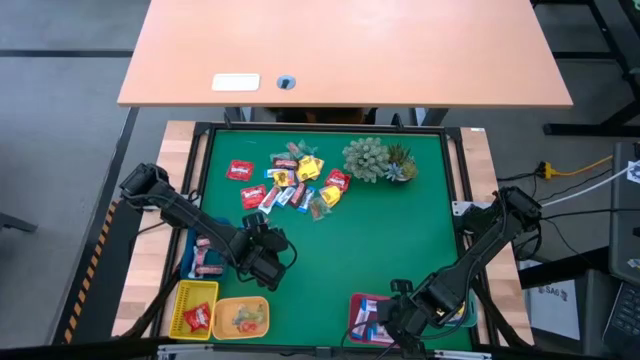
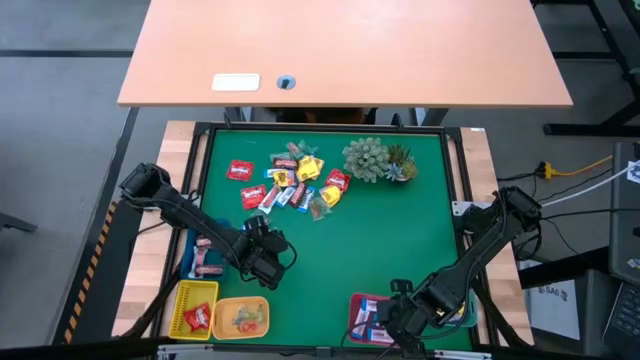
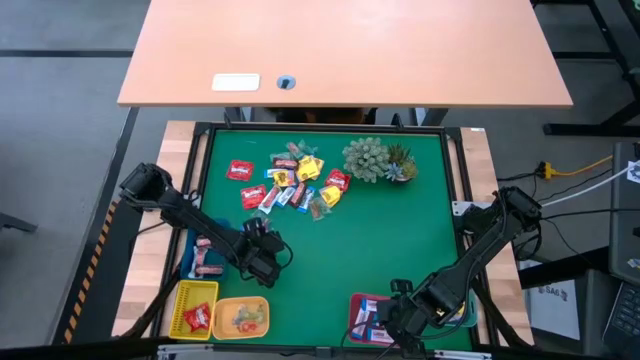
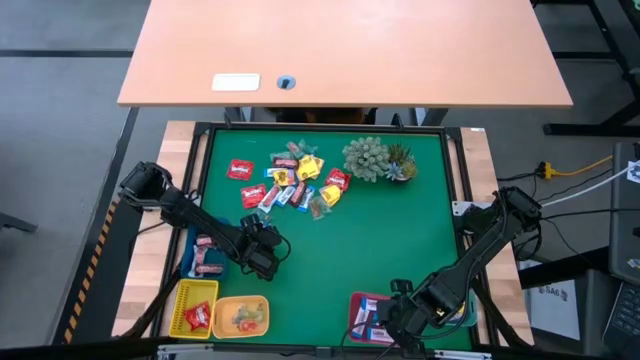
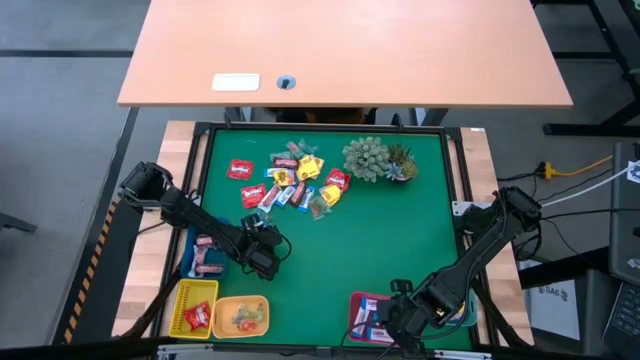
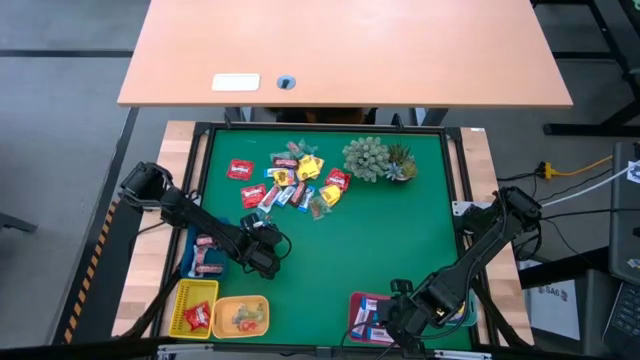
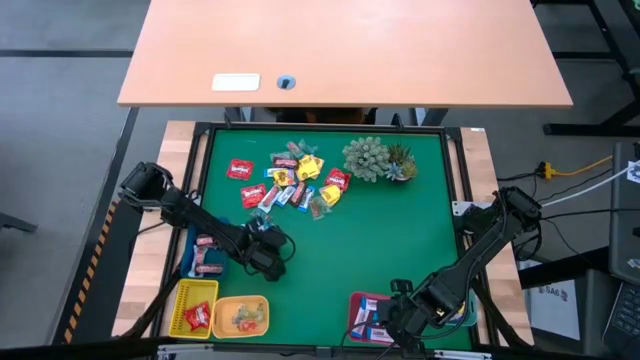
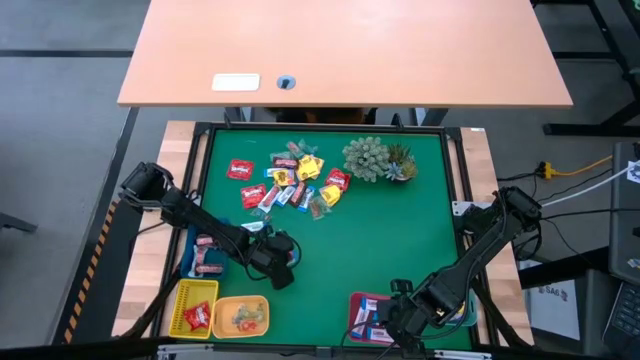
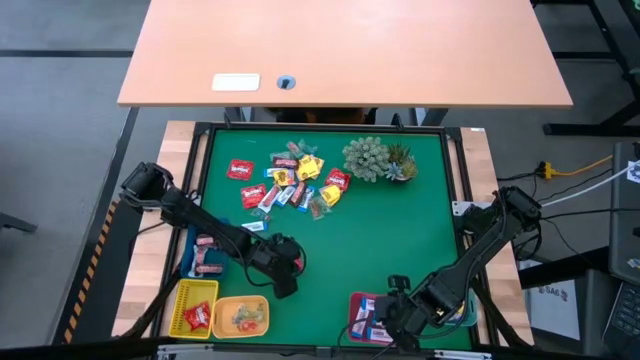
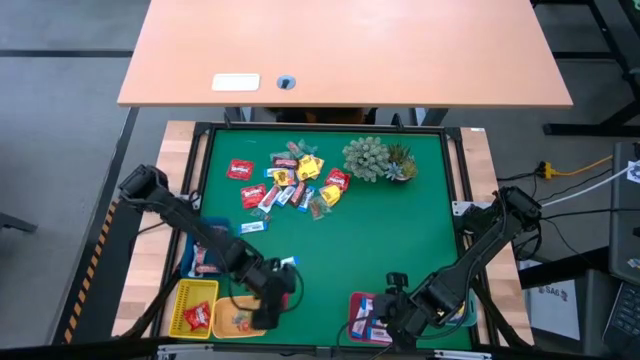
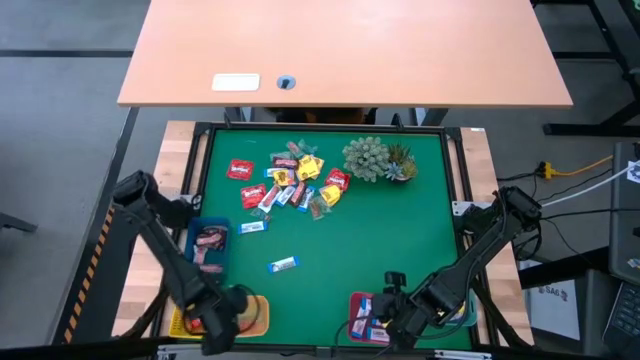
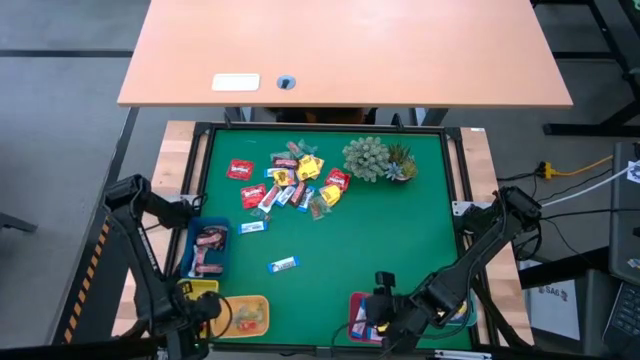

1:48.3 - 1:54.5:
Task: Sort candy
Put the red candy into the yellow bin

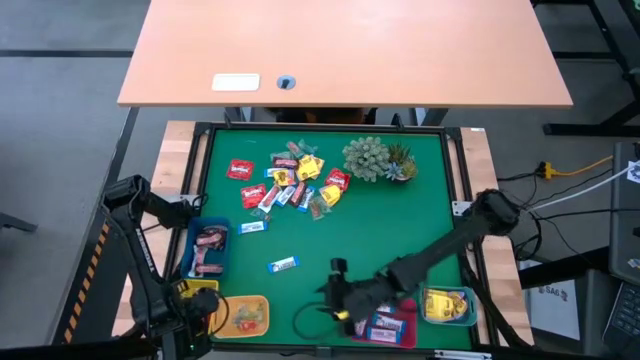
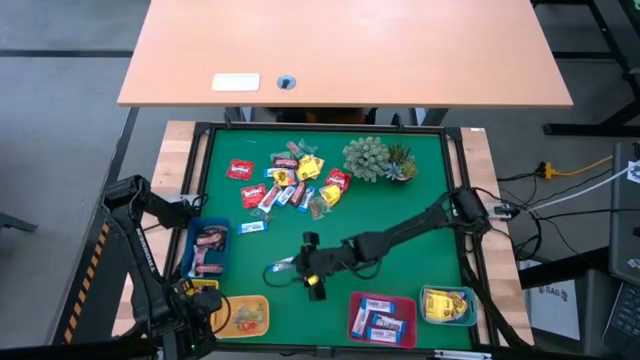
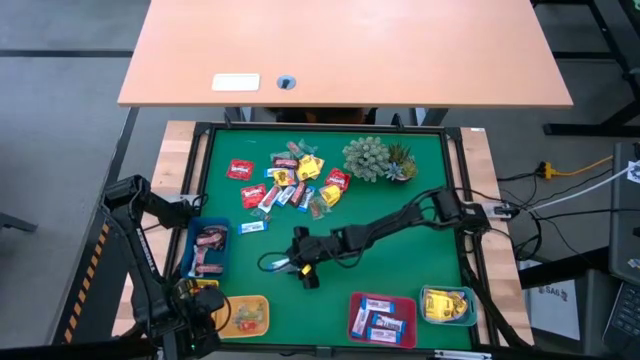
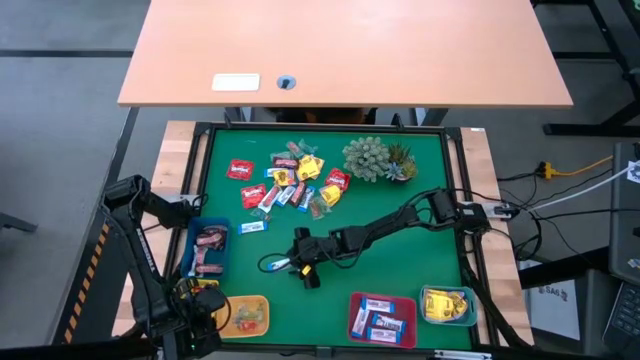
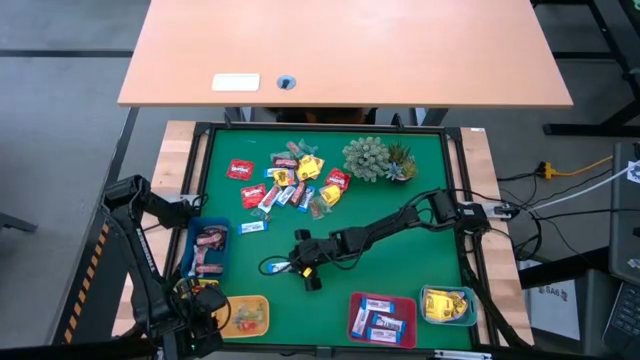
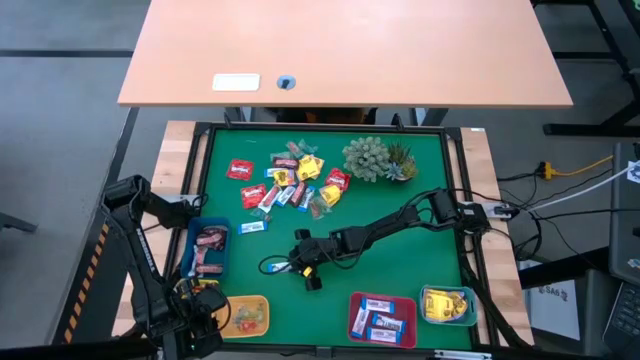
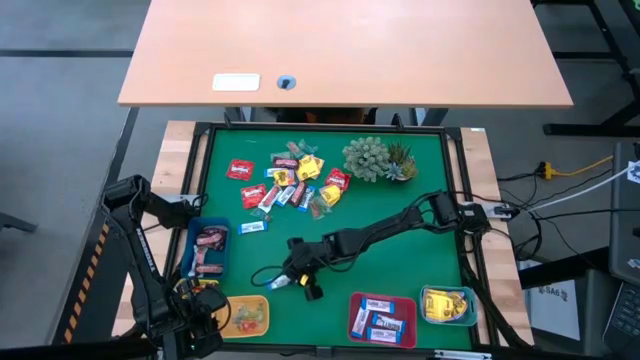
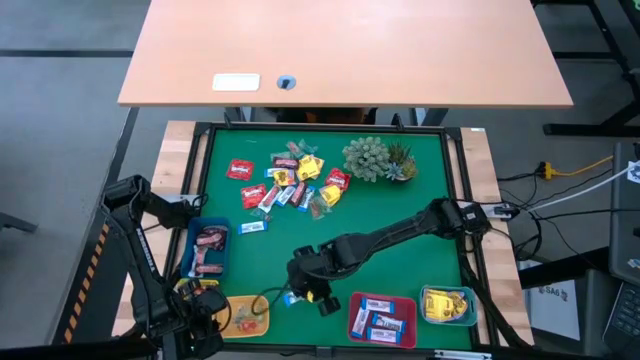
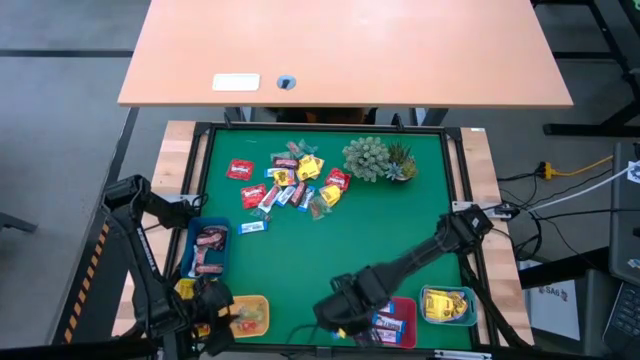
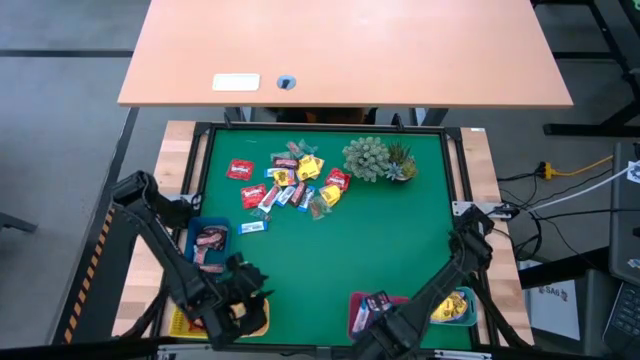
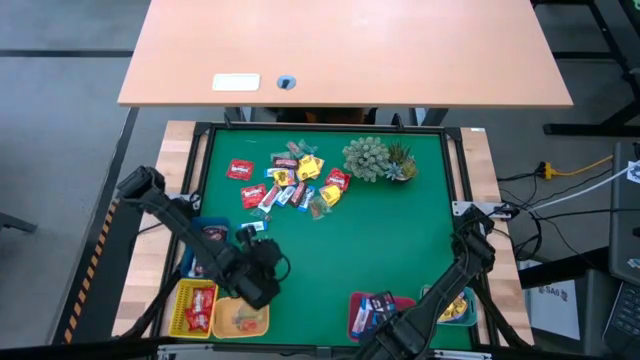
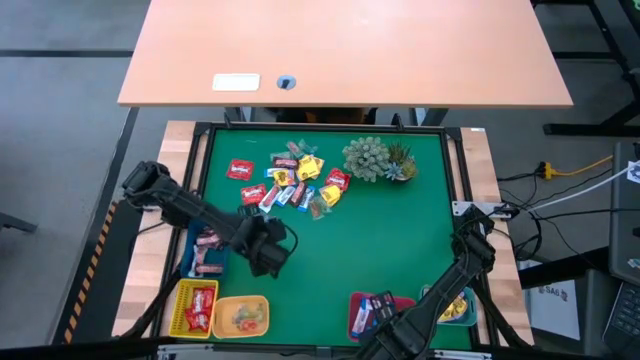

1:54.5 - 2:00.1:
Put the blue chocolate into the red bin

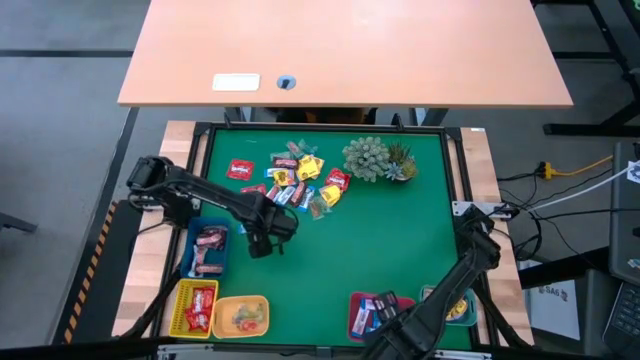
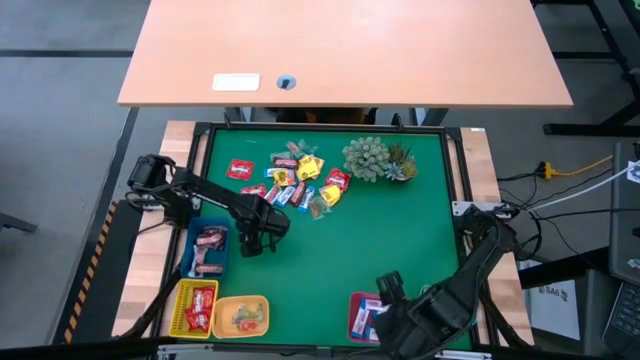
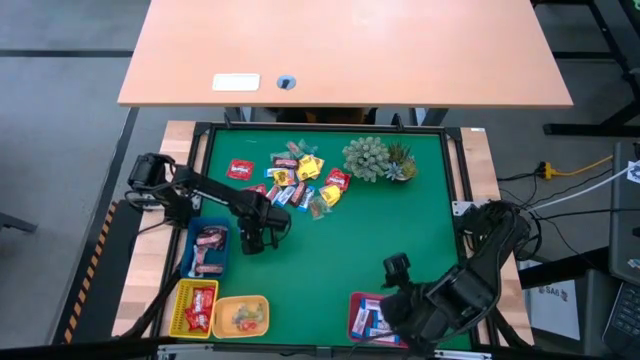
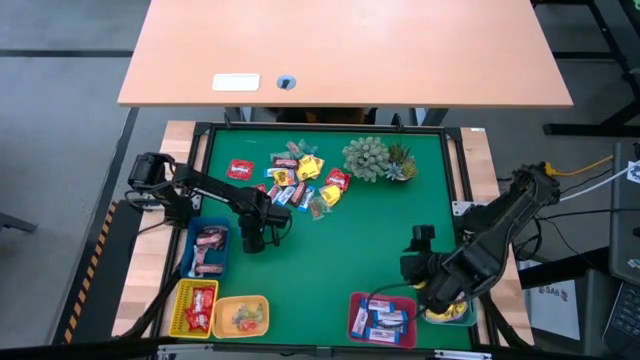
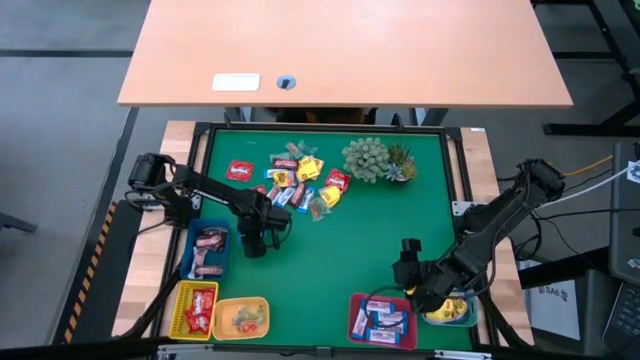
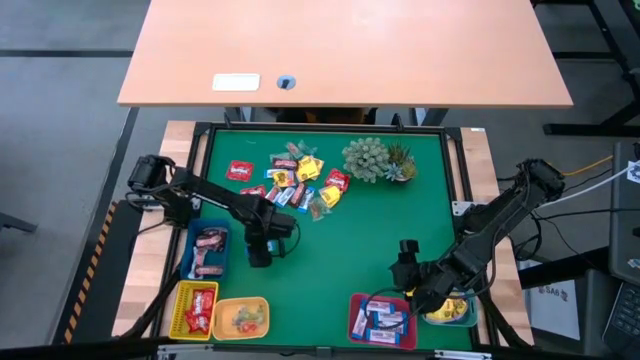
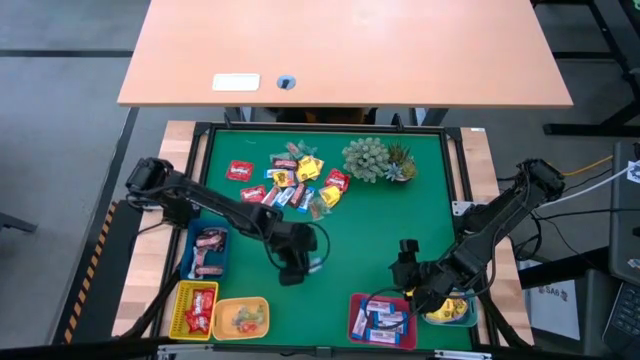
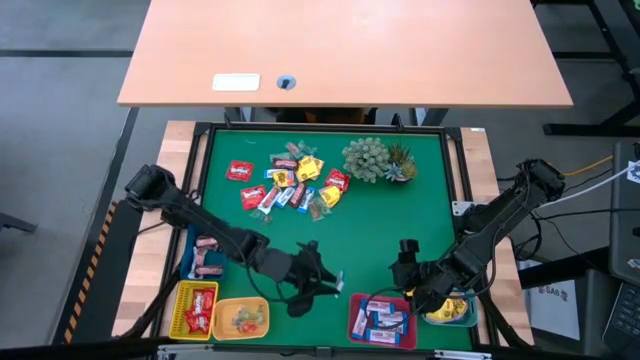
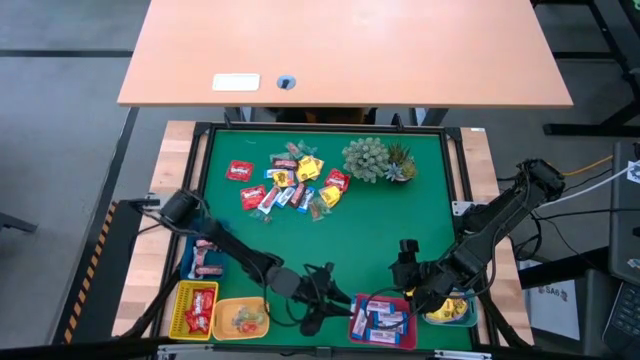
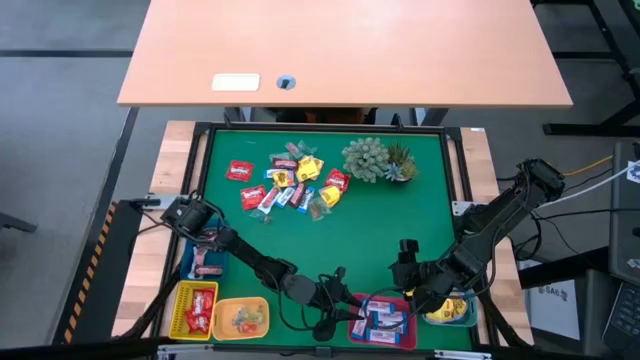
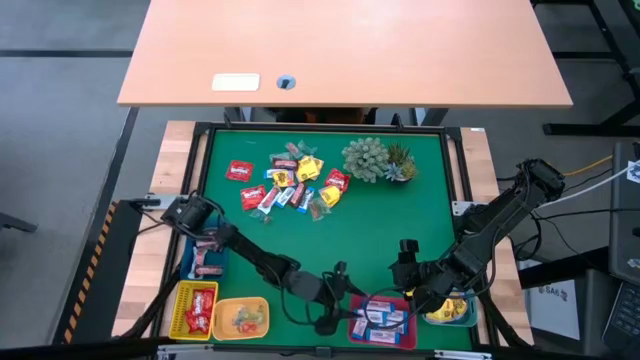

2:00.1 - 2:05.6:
Put the blue chocolate into the red bin

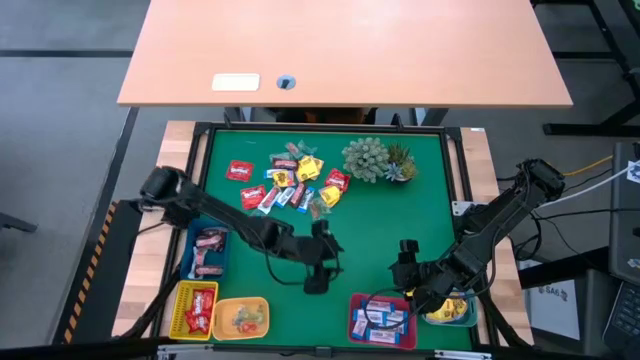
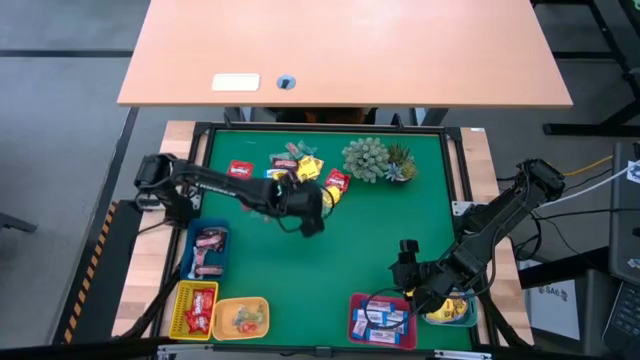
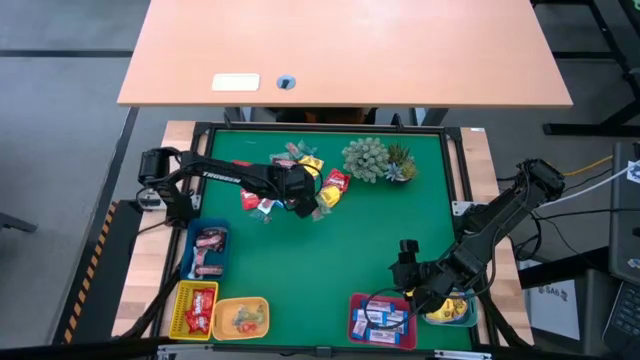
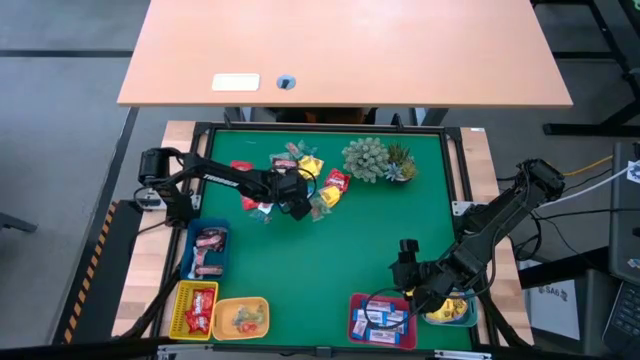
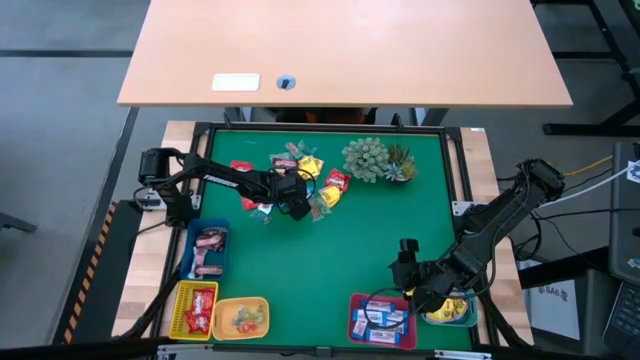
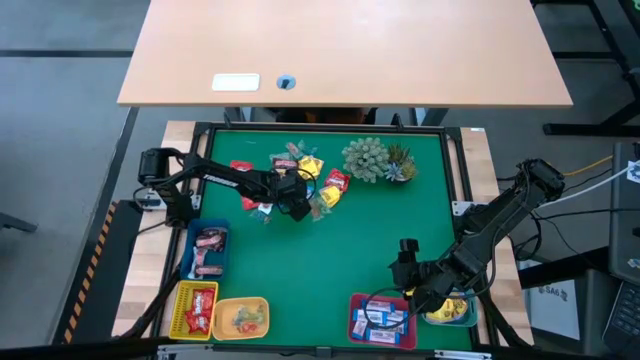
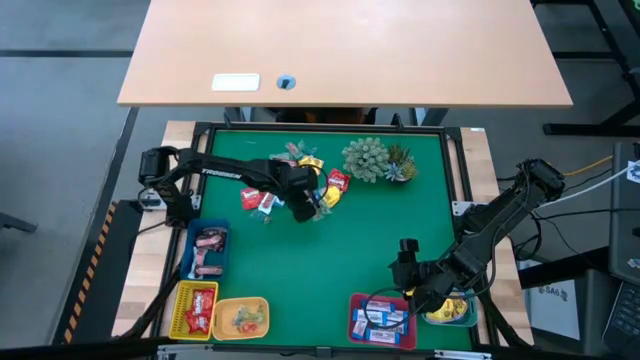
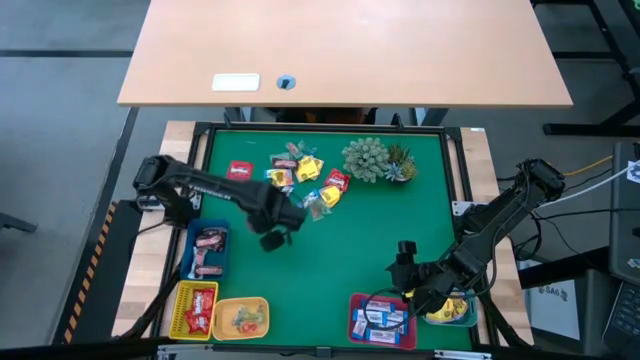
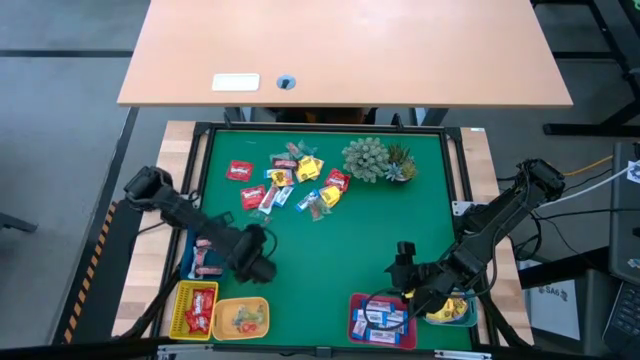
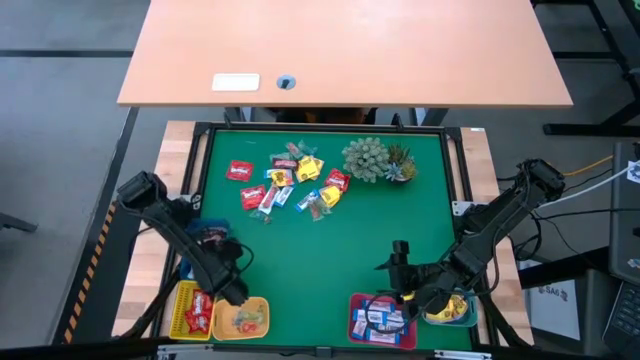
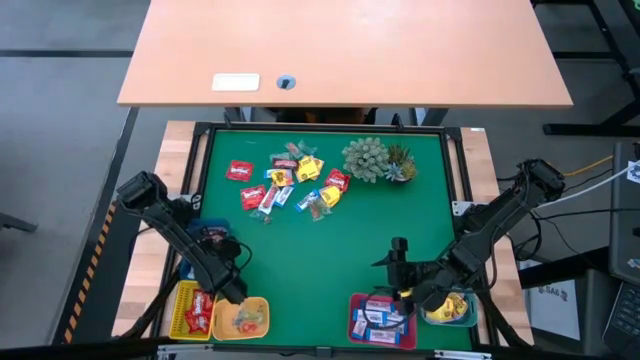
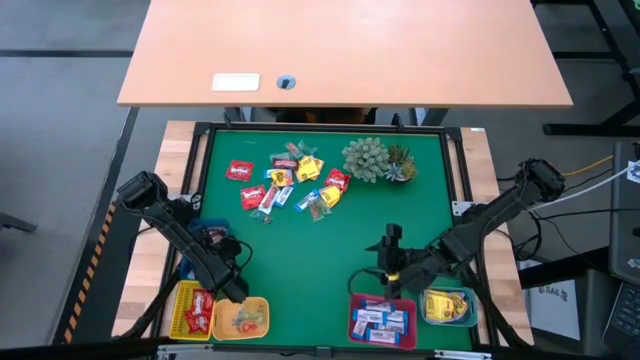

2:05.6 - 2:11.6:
Put the brown chocolate into the blue bin
